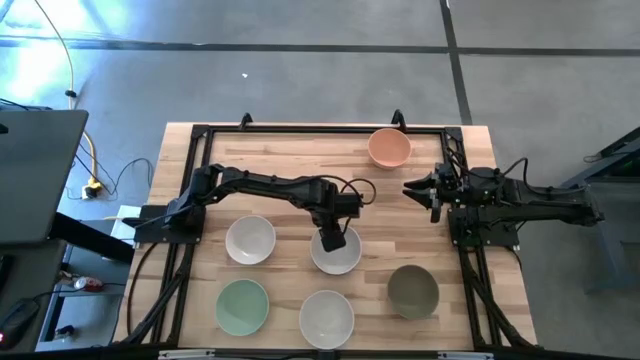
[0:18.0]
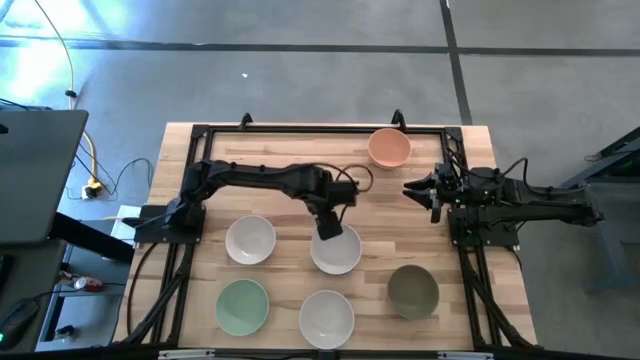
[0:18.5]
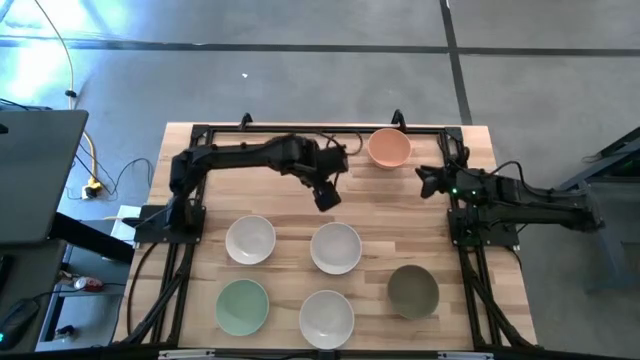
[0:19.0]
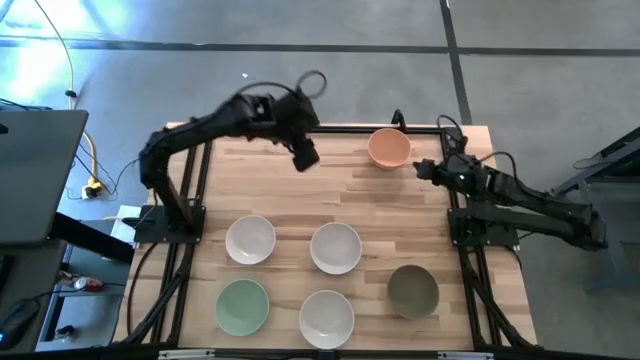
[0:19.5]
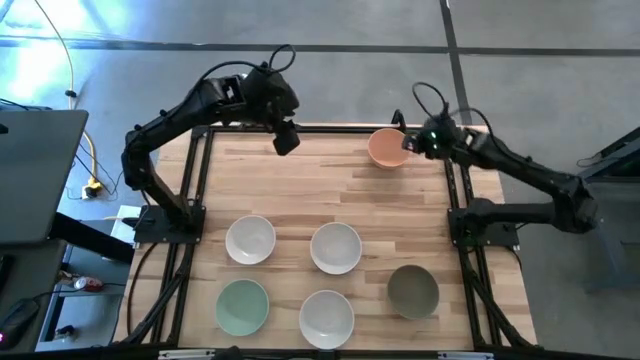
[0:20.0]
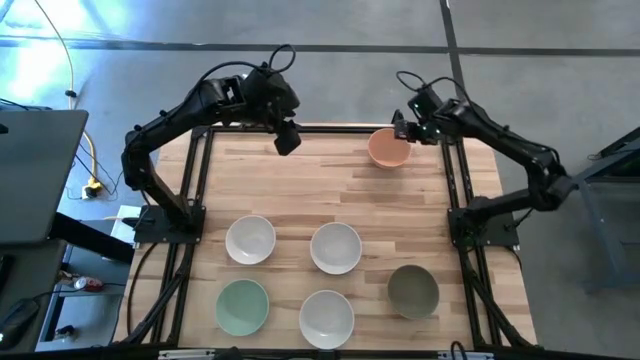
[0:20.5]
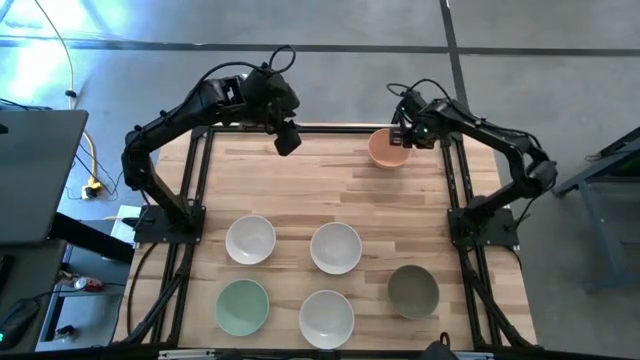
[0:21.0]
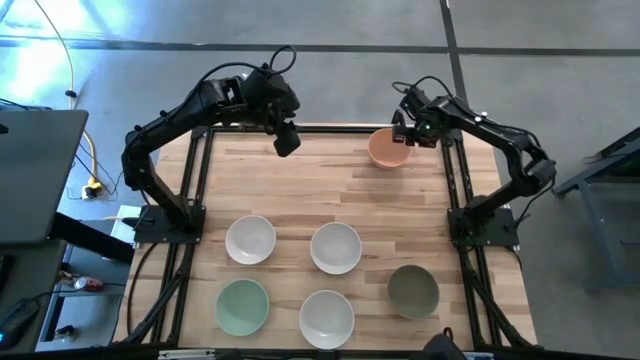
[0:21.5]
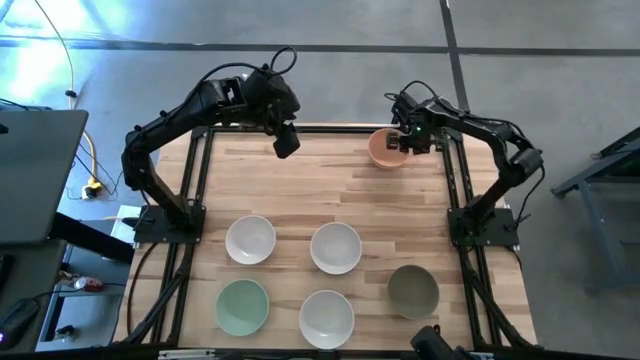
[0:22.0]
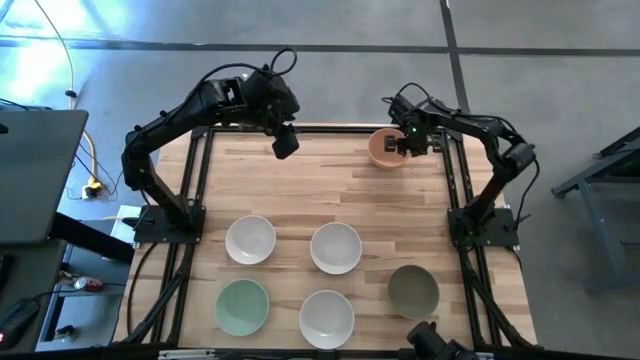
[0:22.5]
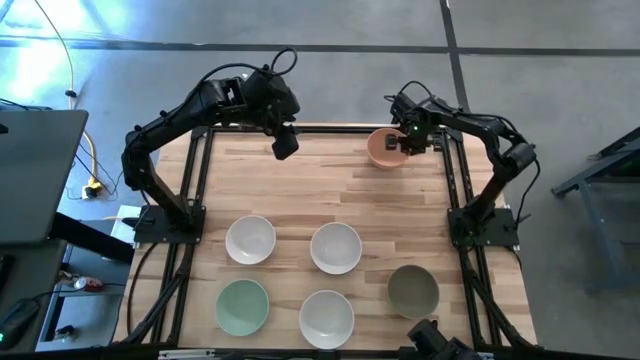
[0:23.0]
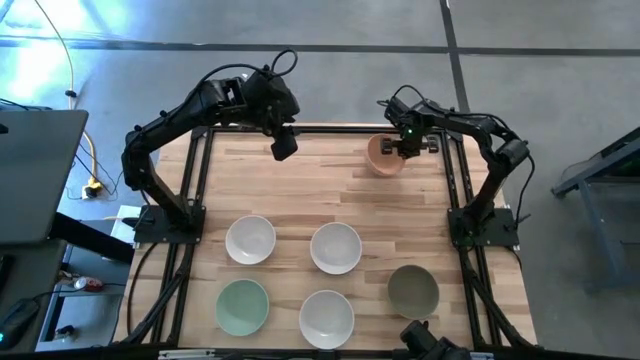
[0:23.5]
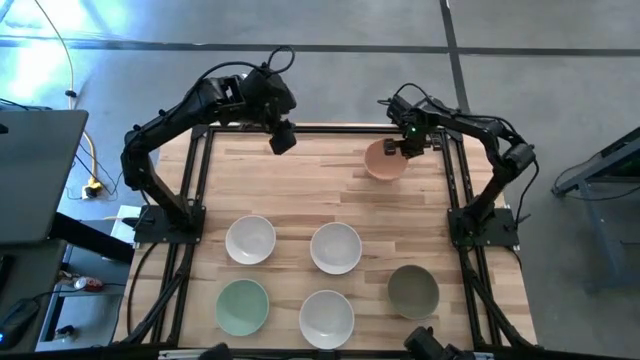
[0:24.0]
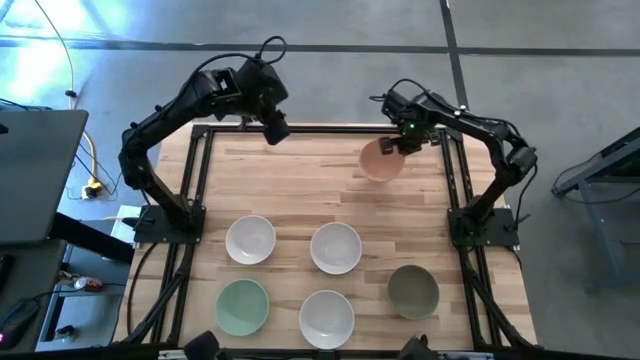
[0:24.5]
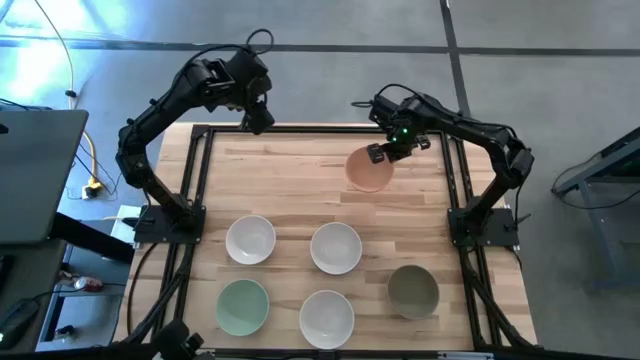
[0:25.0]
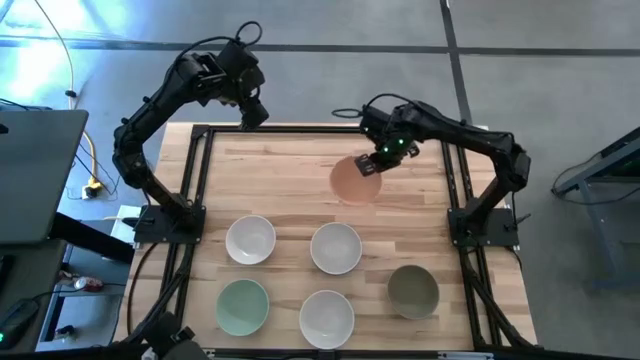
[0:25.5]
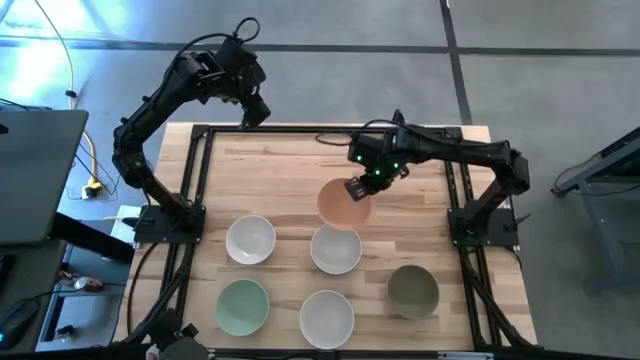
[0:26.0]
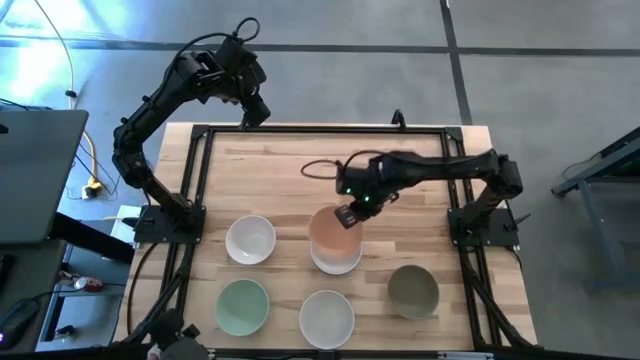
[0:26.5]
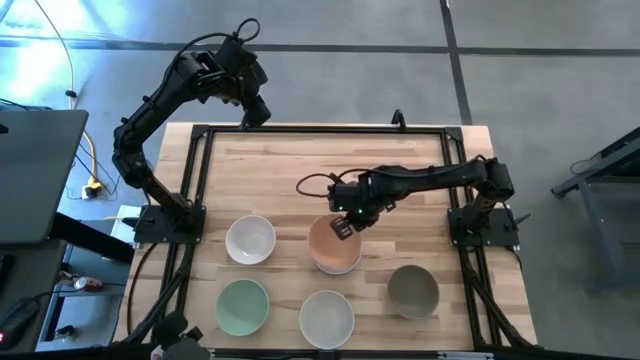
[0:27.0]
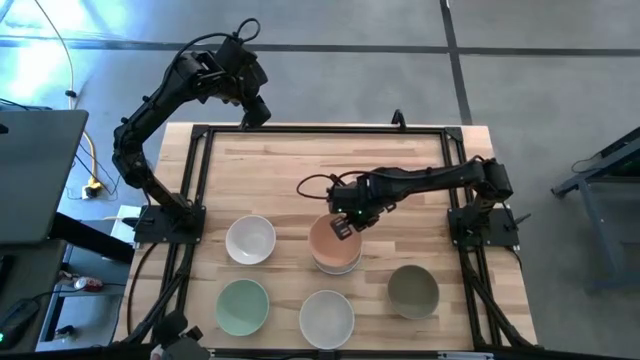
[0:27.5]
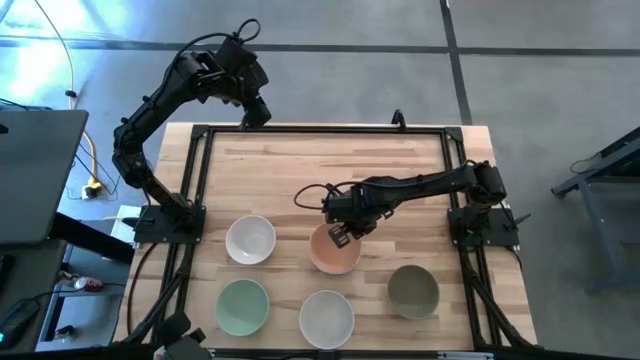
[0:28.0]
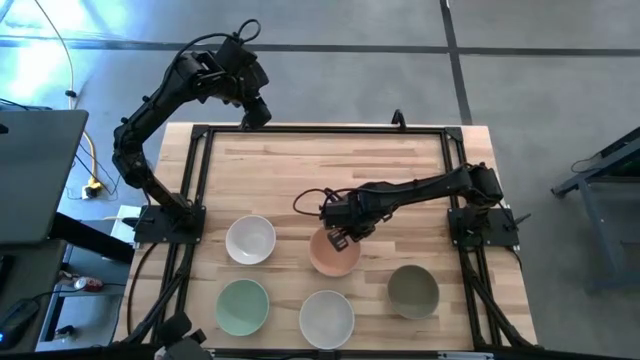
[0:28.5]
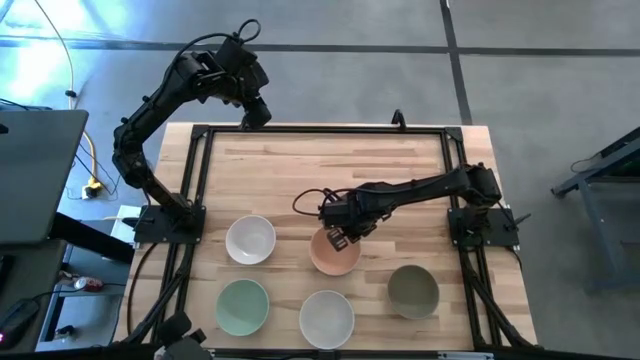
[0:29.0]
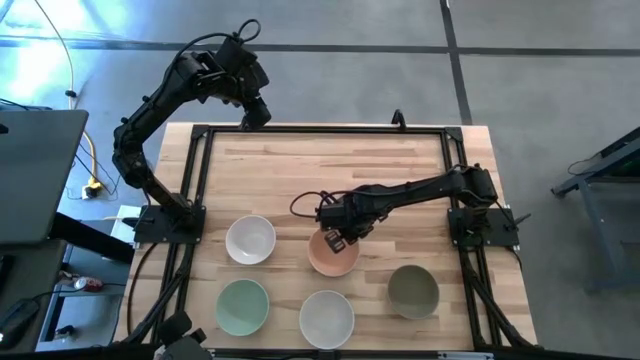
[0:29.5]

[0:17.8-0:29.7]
Task: Nest bowls inside each other
Stack the orange bowl on top of the white bowl

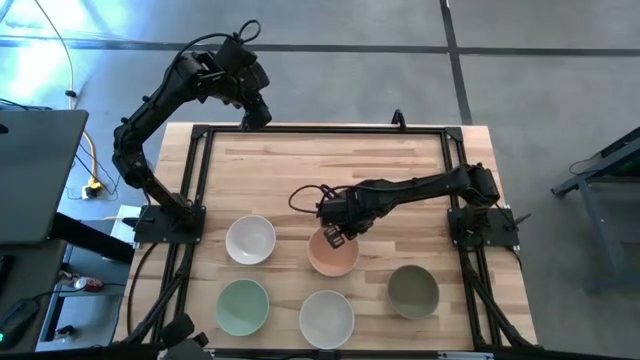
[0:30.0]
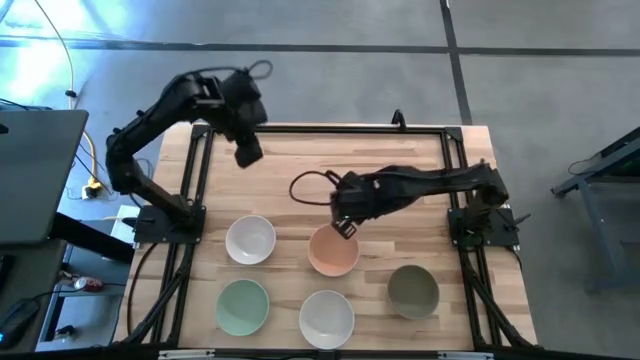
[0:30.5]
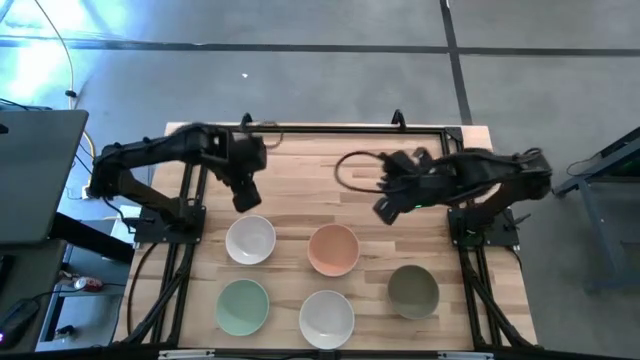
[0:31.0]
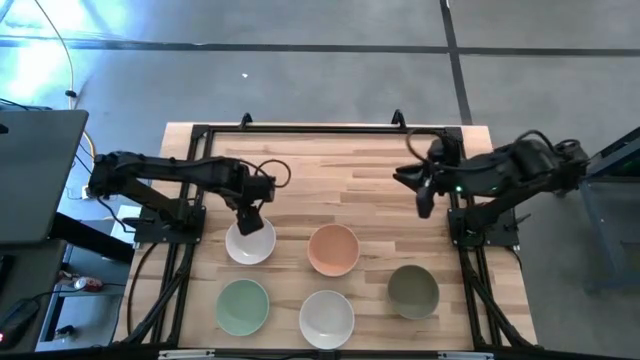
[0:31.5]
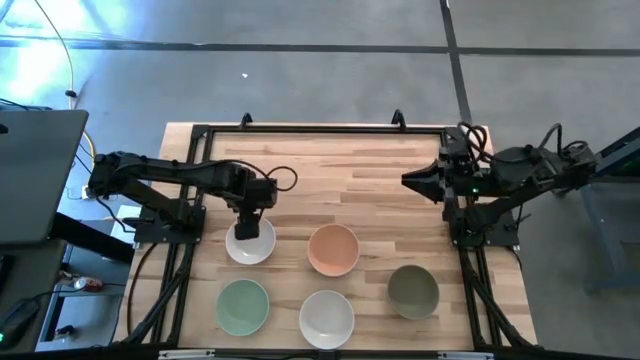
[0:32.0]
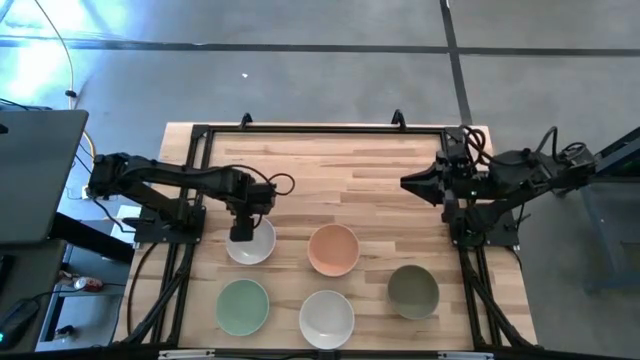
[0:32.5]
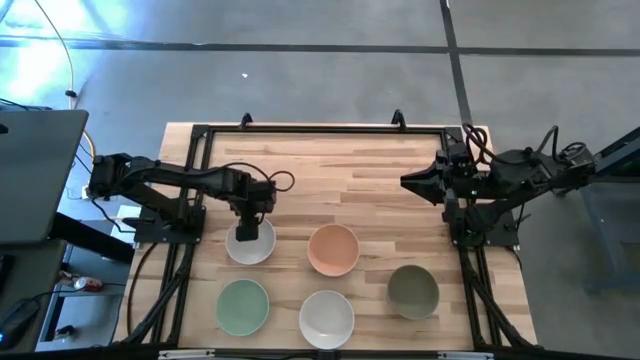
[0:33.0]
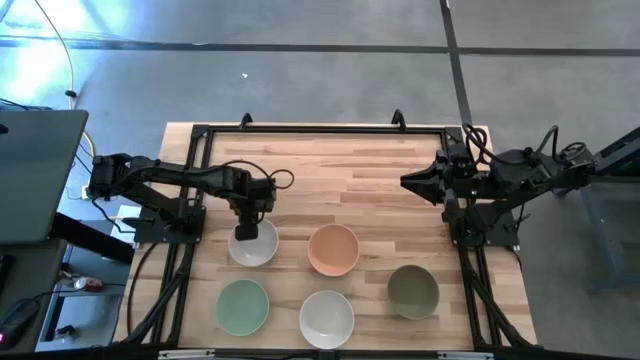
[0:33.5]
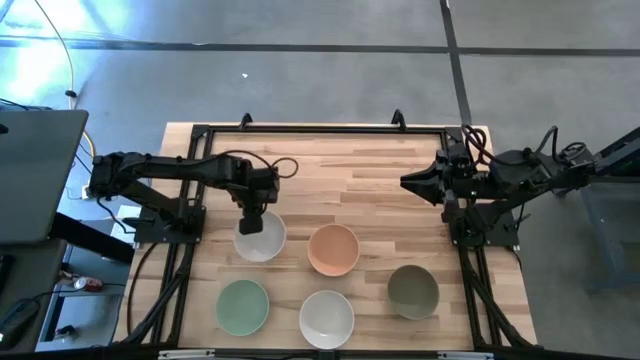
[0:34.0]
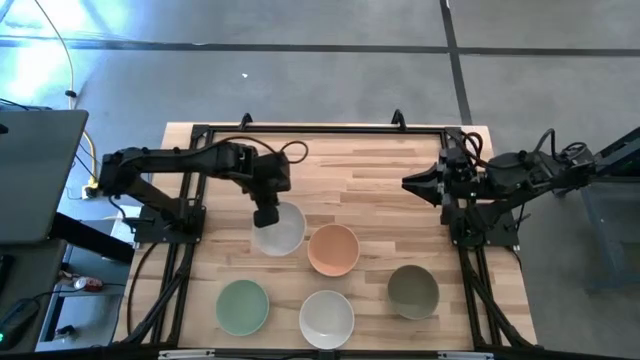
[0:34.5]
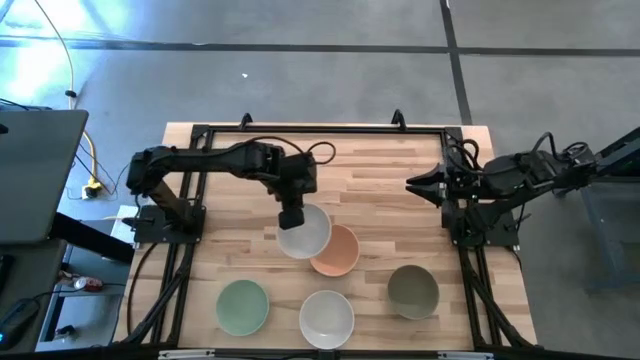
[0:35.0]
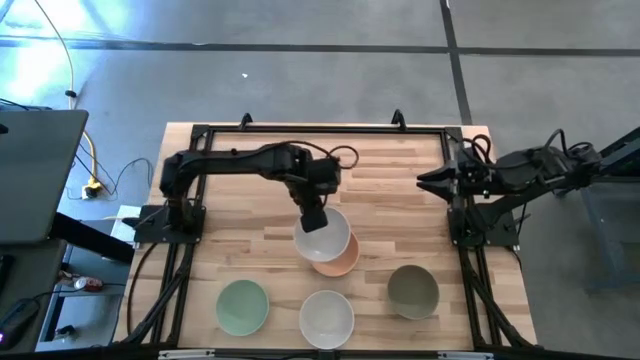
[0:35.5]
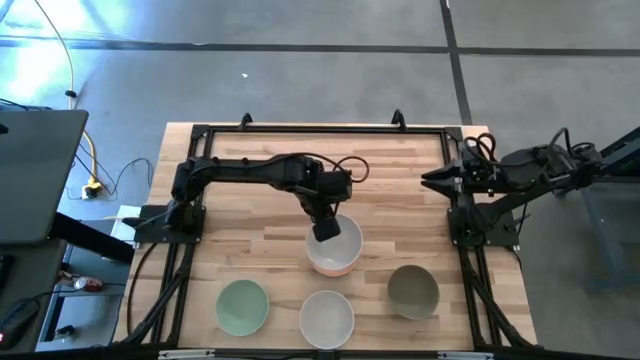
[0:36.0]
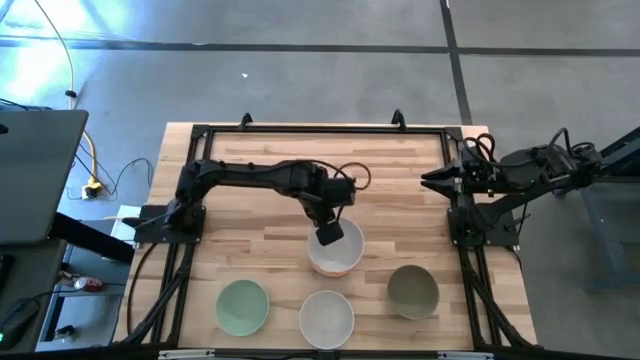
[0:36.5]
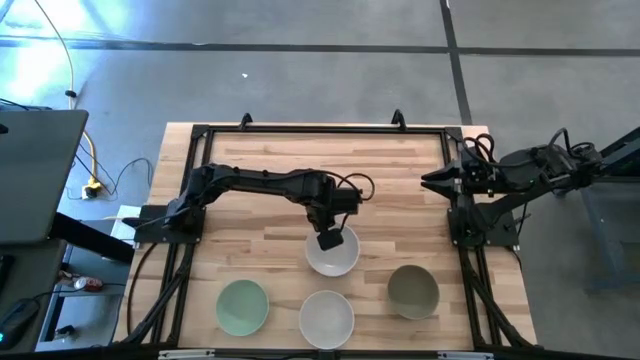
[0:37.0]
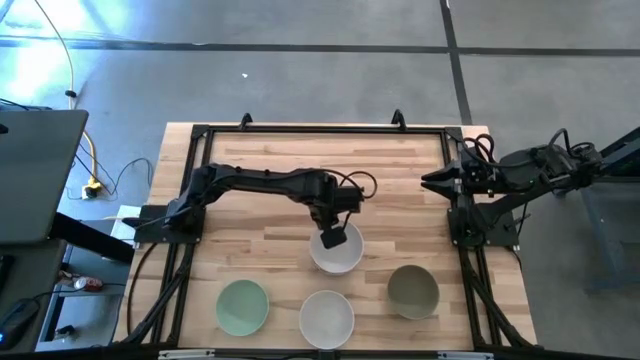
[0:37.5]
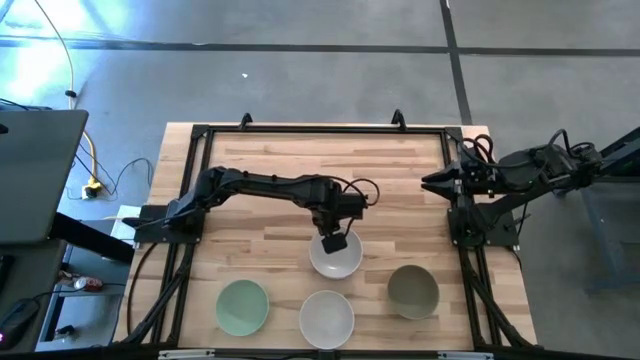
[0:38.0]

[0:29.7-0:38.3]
Stack the top white bowl on top of the orange bowl

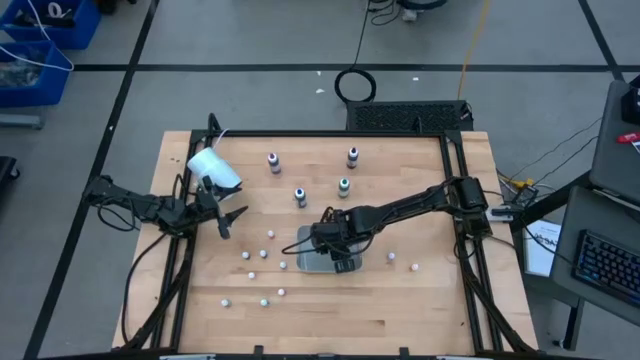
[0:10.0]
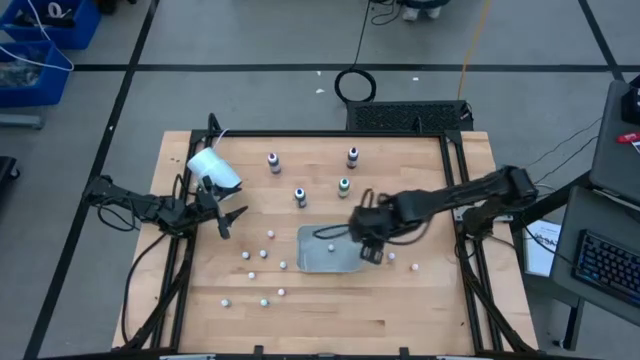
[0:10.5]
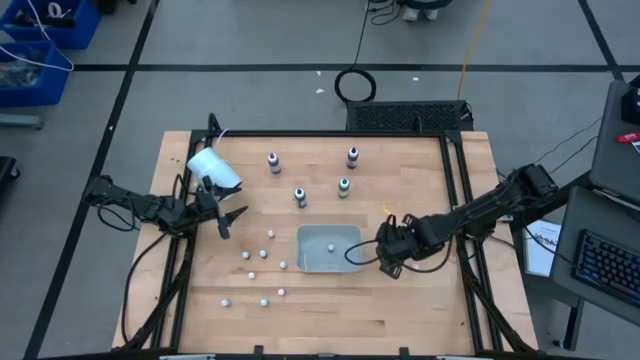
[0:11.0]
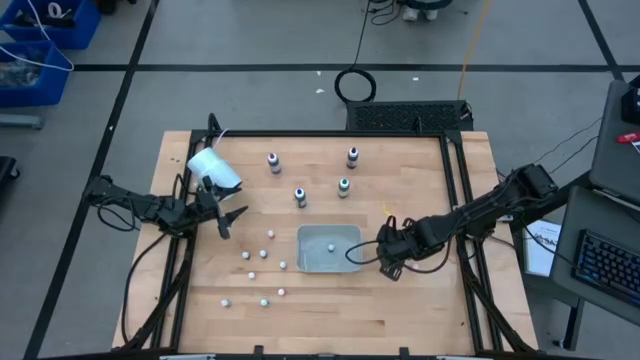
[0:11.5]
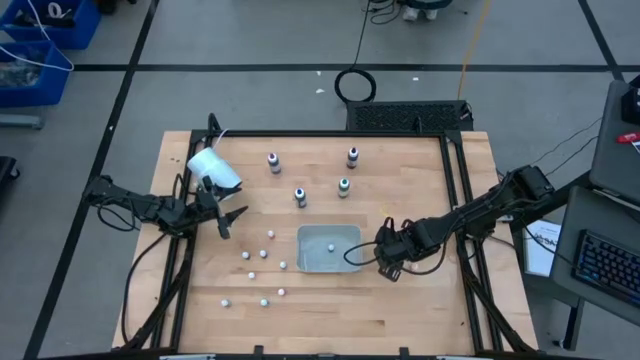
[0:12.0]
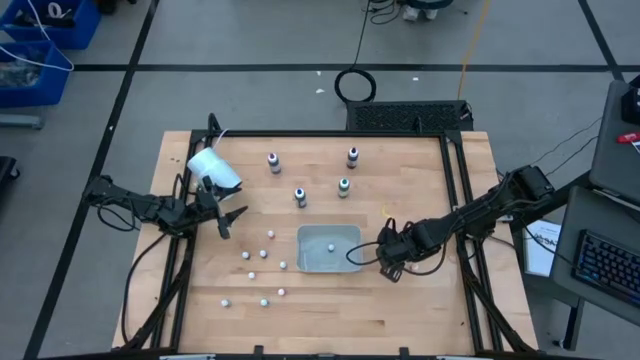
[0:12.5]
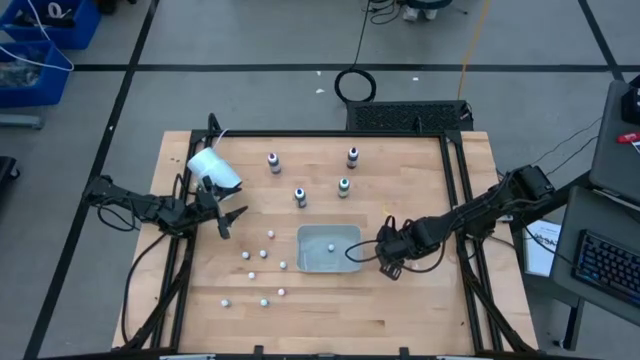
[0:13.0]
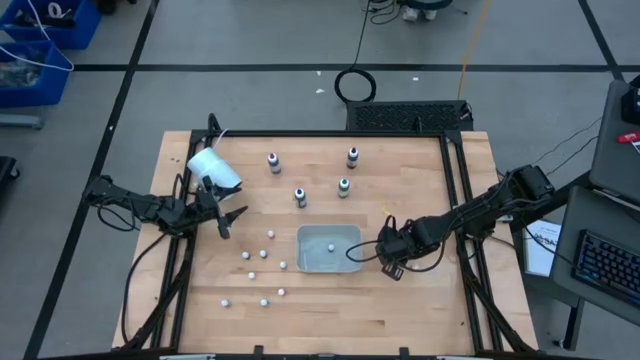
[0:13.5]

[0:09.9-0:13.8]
Task: Pick & Place food coloring
Put the purple food coloring bottle into the bin
